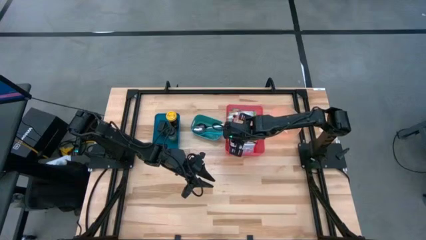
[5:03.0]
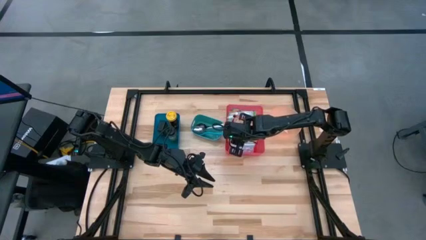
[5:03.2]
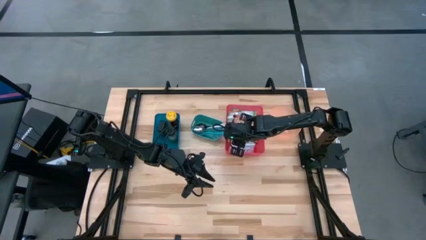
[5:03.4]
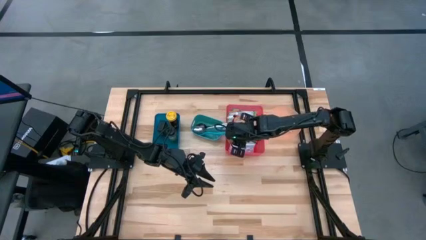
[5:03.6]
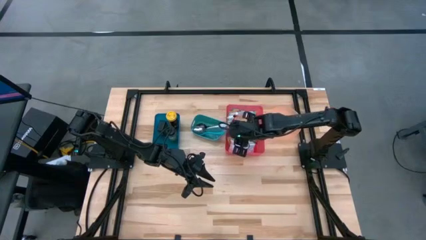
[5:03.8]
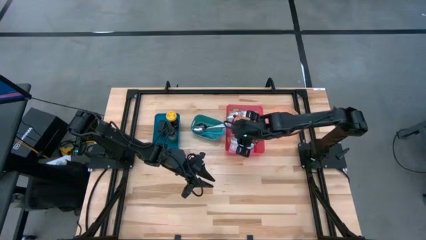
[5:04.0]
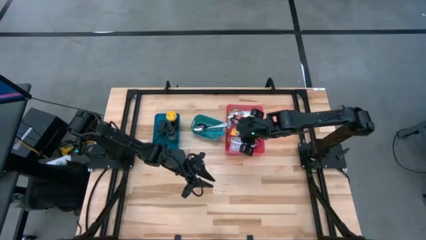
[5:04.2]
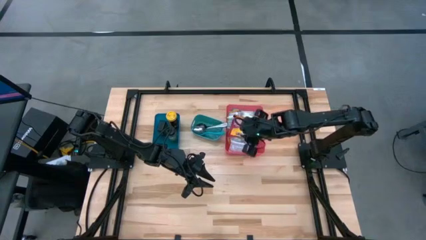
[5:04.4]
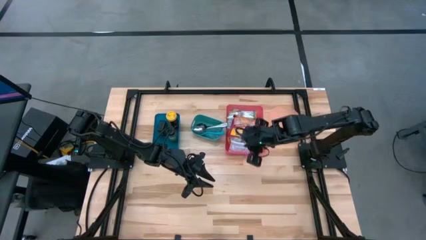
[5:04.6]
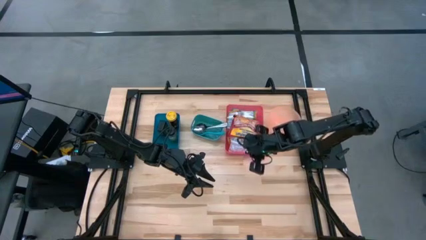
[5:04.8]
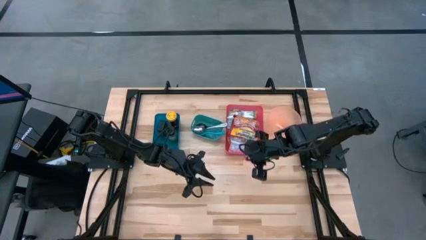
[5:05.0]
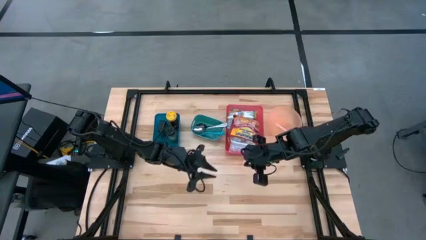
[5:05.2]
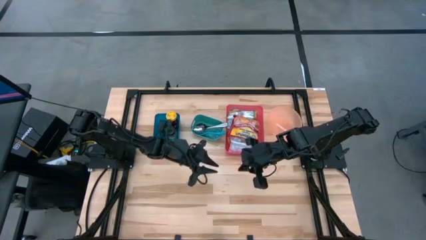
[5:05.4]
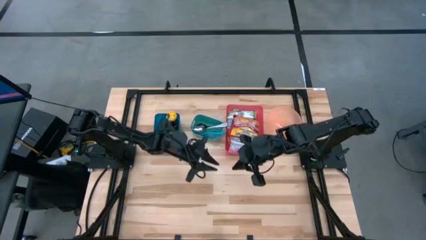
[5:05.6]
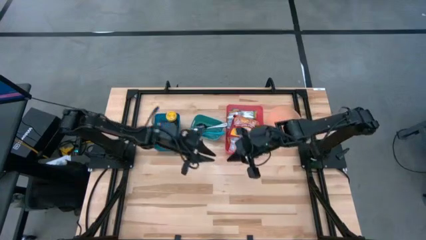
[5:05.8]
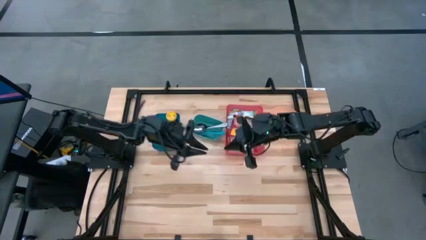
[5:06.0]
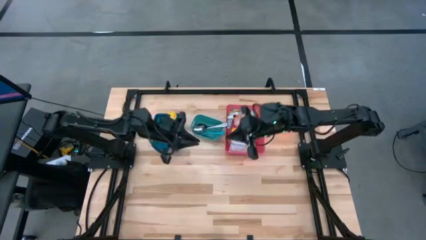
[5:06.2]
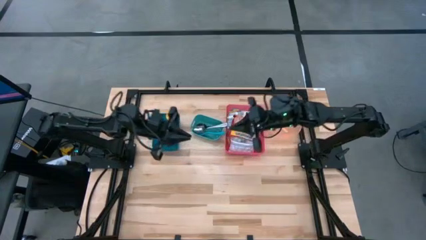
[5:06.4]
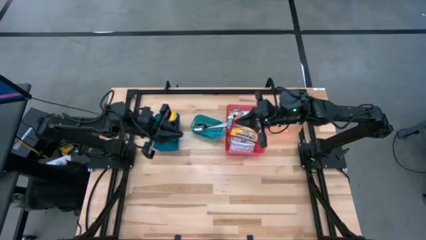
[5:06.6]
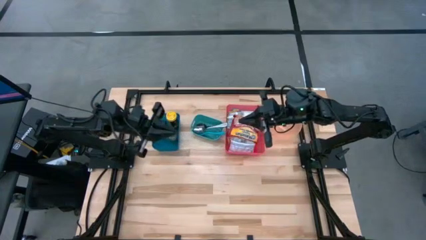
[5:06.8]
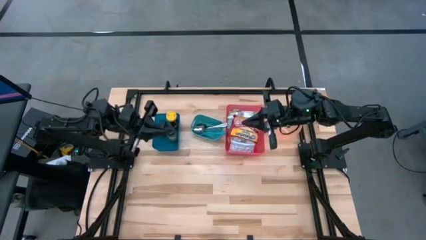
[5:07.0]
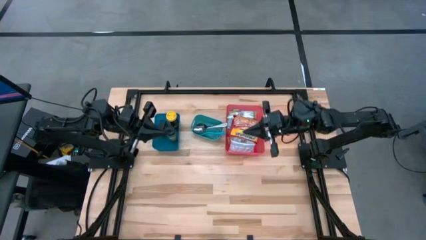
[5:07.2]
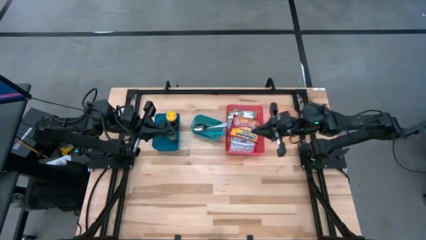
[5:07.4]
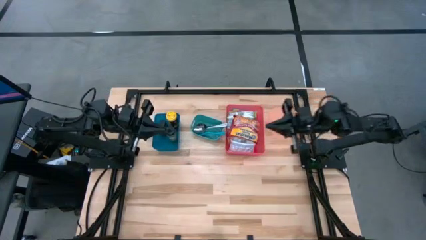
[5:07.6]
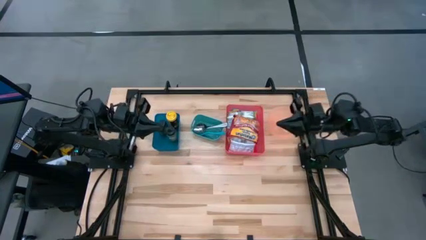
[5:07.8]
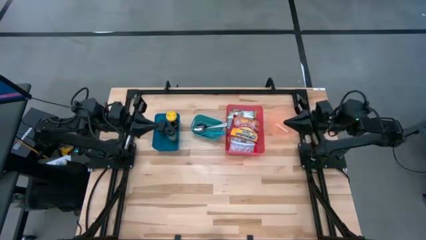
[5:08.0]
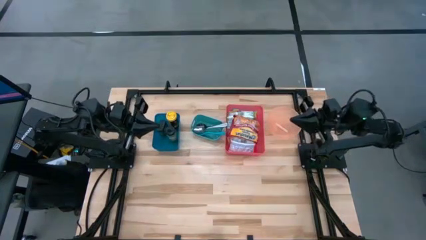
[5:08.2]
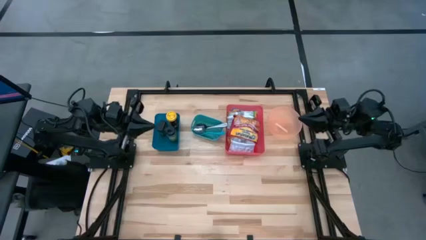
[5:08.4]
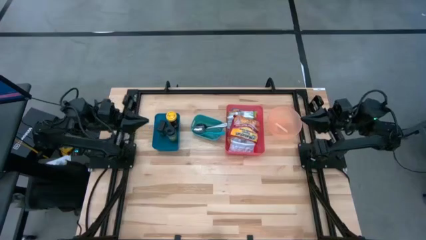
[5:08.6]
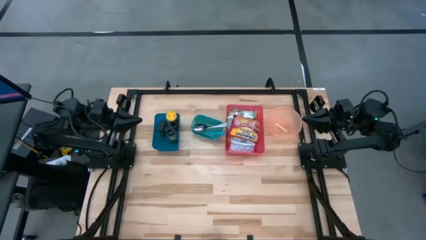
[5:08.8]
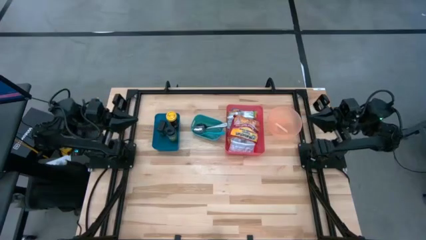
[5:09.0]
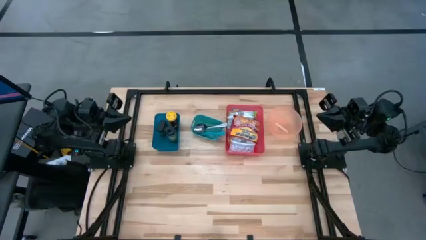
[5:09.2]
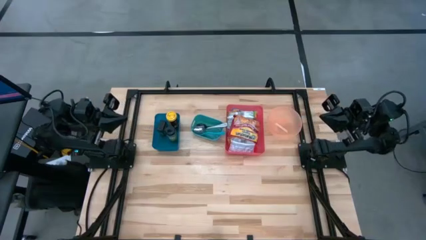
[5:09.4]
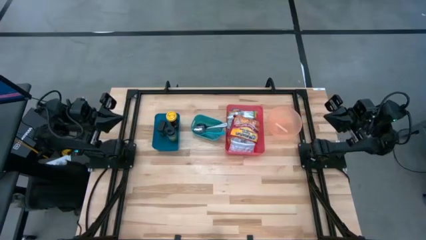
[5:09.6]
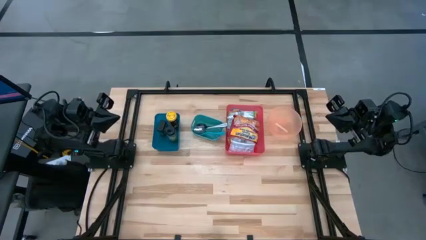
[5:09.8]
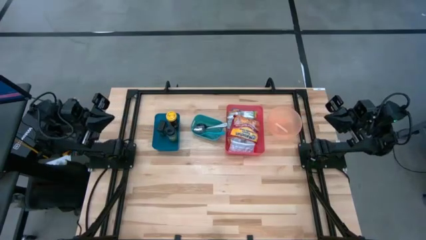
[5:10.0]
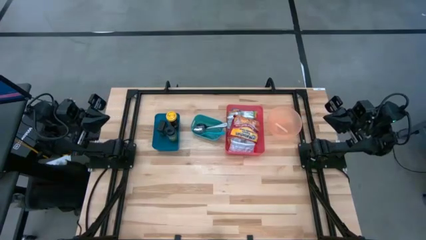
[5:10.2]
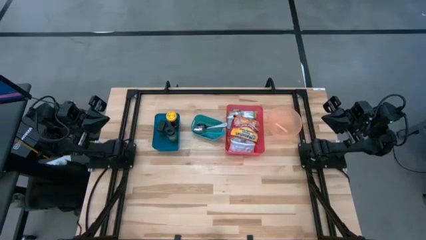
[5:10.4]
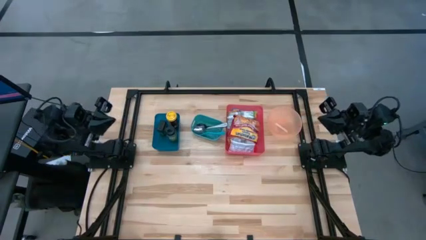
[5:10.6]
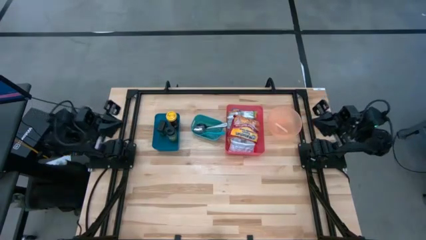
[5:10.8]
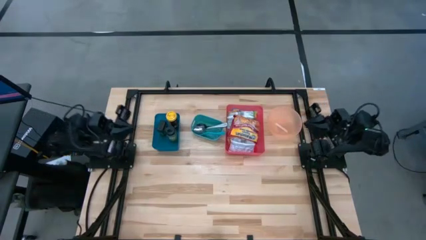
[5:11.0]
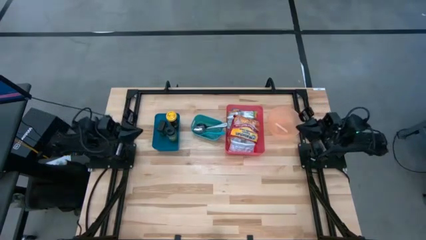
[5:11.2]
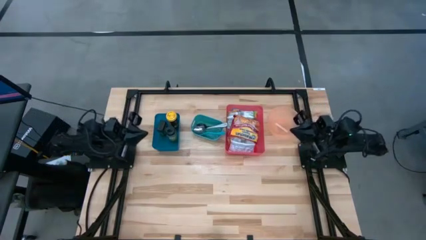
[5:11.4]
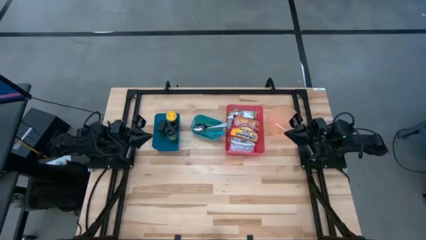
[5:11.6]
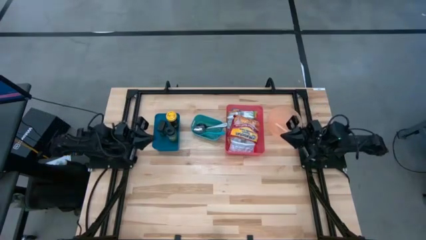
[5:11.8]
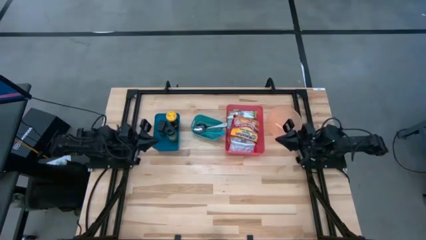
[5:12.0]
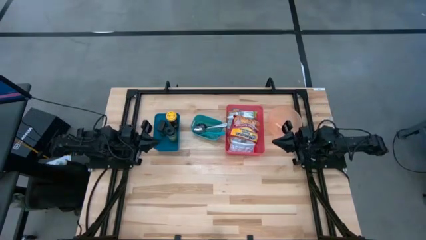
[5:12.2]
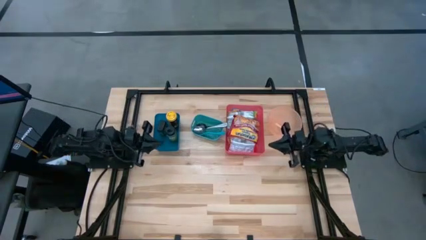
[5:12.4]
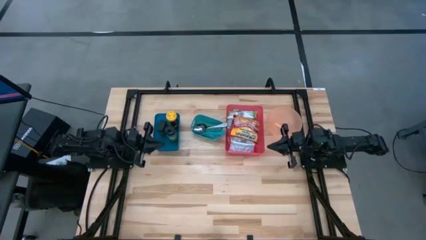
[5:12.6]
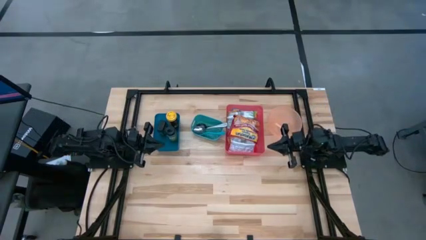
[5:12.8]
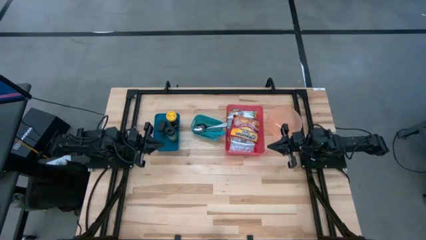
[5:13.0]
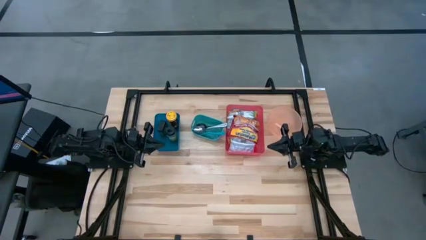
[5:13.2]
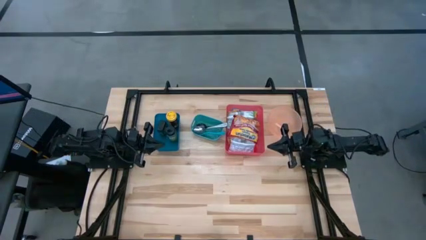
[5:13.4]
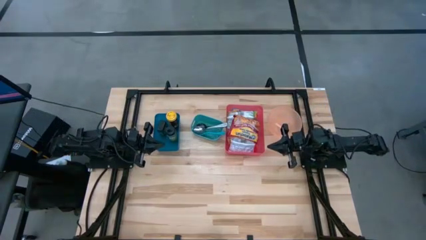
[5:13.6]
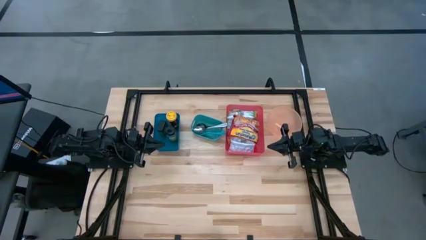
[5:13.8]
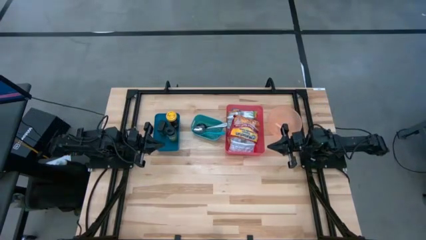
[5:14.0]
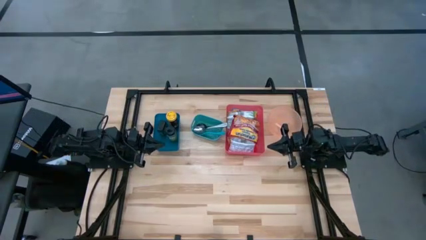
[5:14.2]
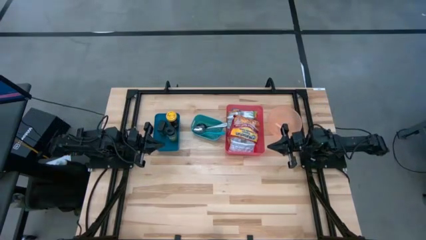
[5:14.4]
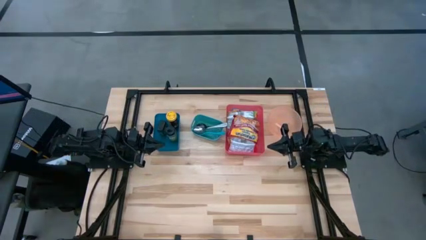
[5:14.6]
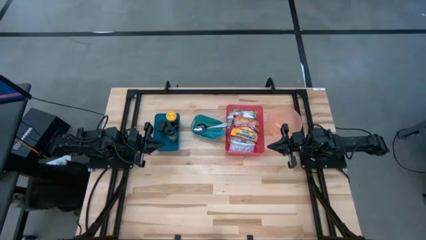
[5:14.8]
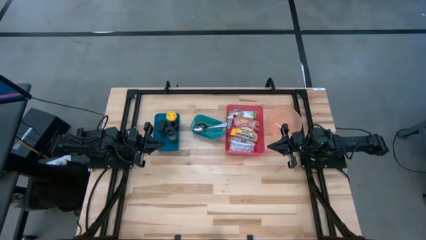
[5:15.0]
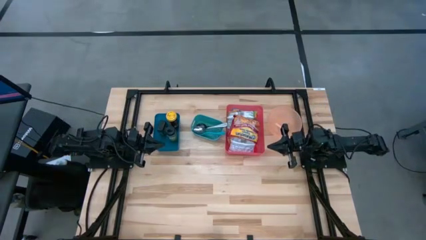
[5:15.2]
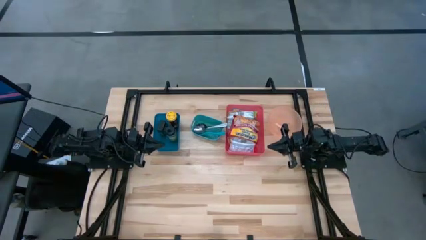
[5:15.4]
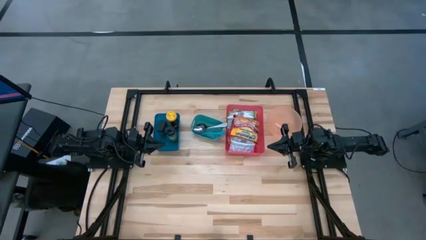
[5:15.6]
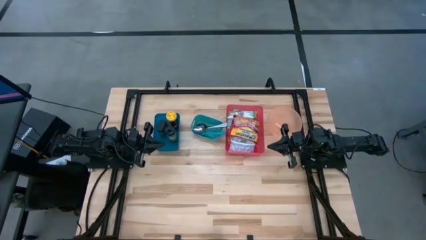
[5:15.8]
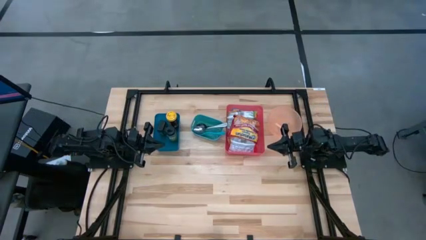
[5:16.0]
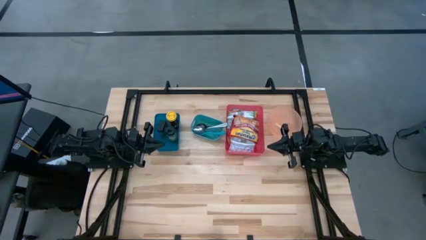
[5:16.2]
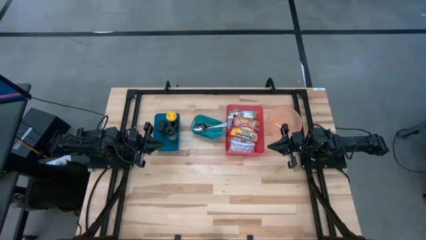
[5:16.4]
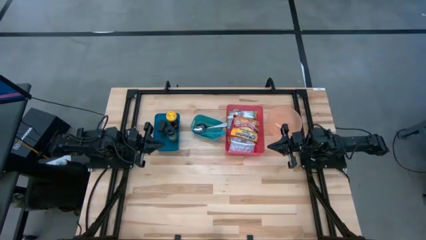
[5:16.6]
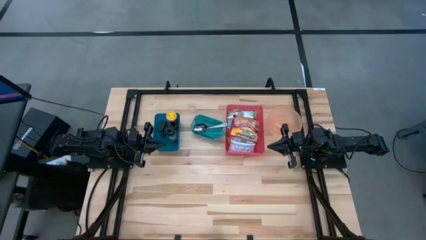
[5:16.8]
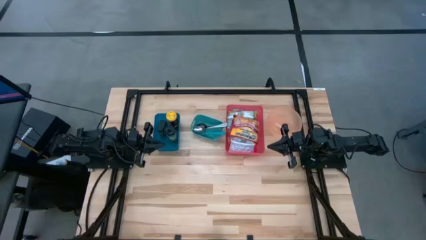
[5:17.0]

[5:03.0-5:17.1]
Task: Pick & Place Food Item
Return to Home Position

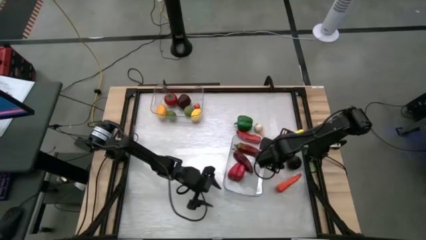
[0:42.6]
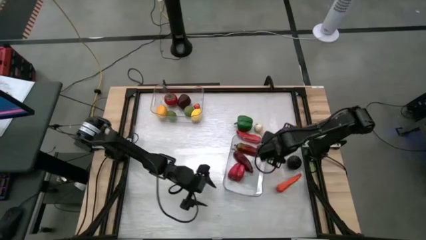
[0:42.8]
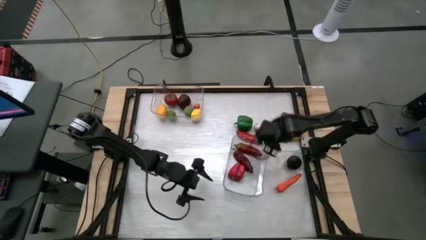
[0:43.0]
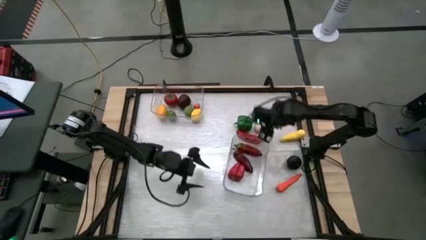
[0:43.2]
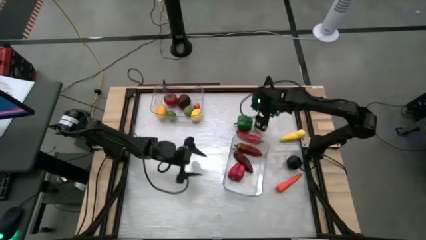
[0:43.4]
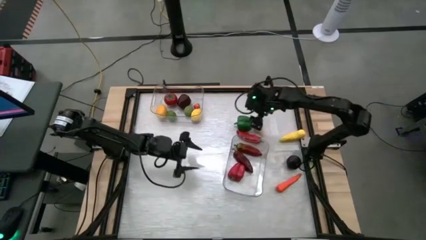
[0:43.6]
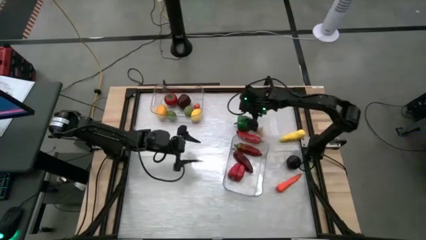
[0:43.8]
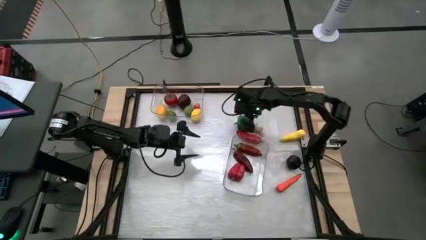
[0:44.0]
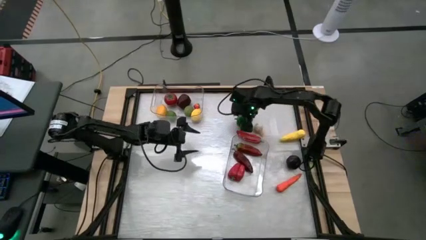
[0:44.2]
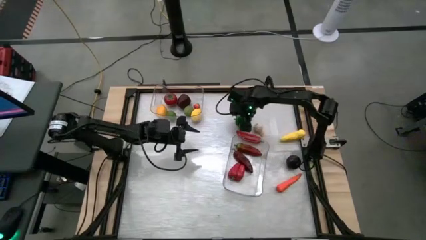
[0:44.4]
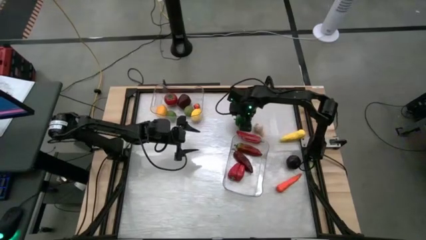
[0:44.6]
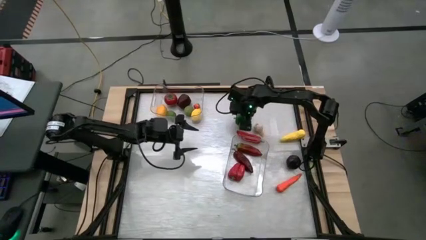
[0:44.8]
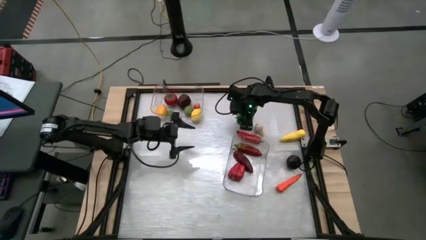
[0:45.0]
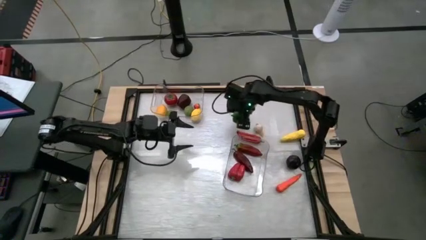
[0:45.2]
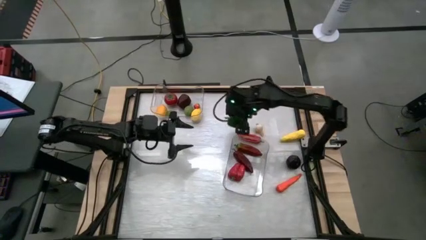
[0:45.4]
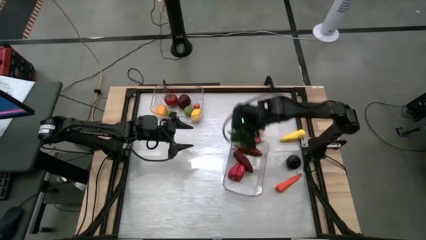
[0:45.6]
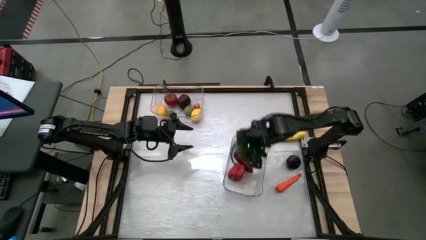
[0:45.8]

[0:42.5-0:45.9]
Task: Sort produce into baskets
Put the green bell pepper into the bottom transparent bin
